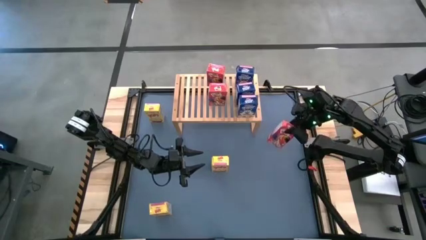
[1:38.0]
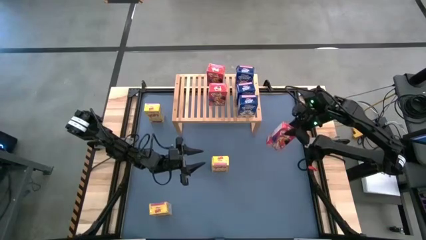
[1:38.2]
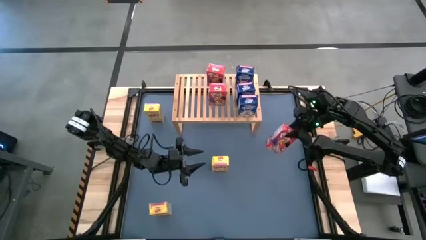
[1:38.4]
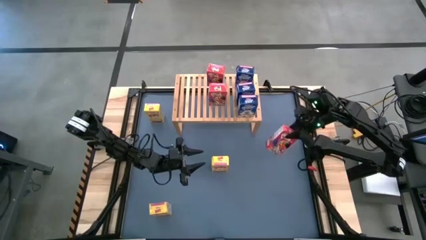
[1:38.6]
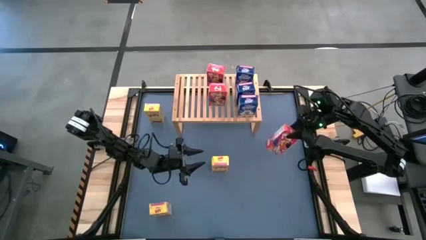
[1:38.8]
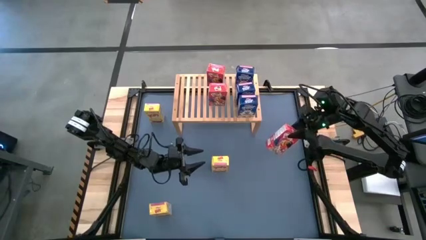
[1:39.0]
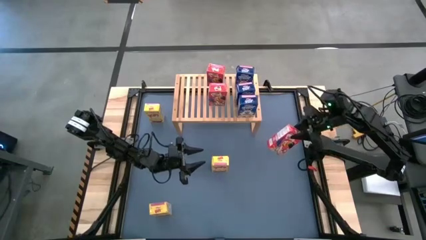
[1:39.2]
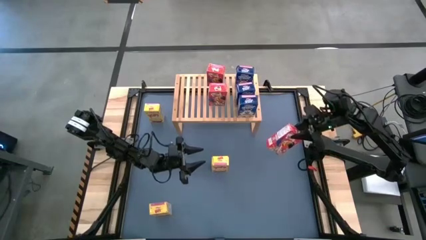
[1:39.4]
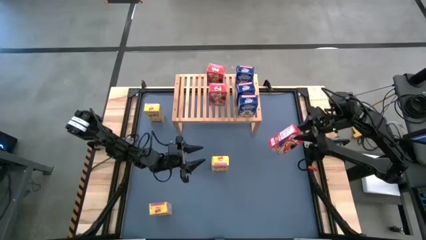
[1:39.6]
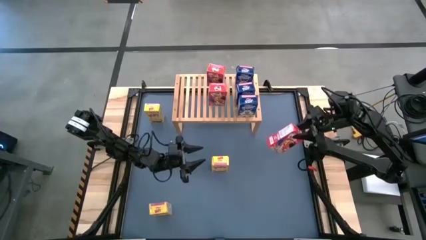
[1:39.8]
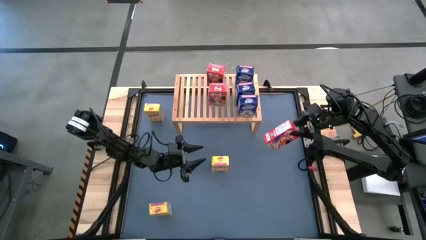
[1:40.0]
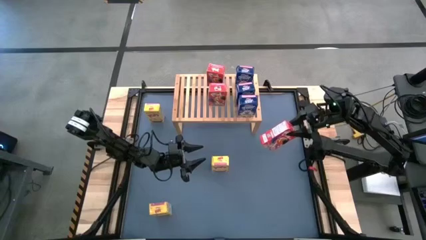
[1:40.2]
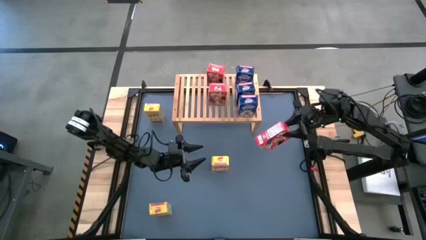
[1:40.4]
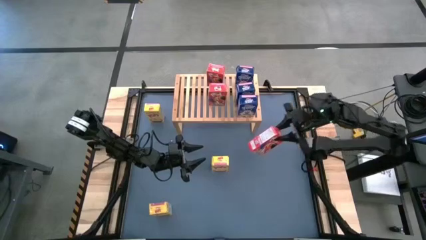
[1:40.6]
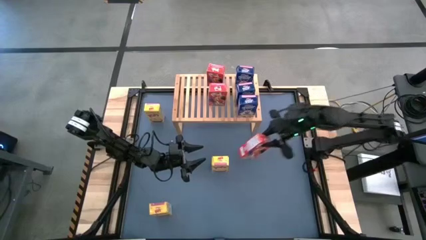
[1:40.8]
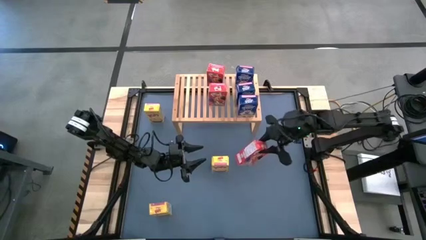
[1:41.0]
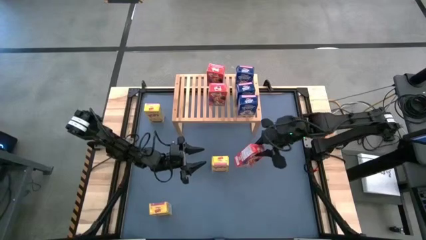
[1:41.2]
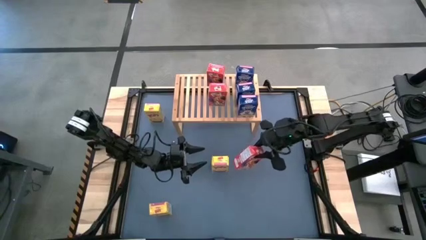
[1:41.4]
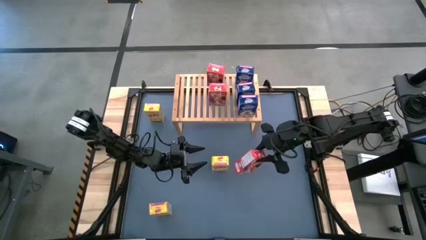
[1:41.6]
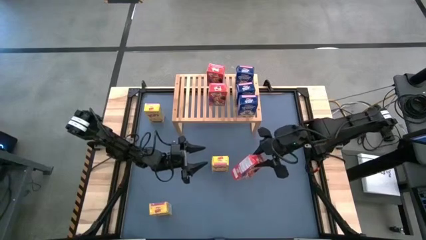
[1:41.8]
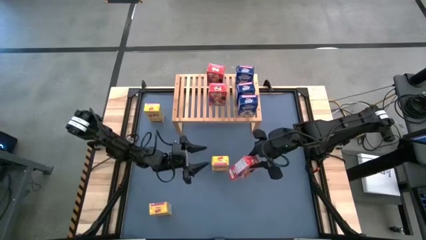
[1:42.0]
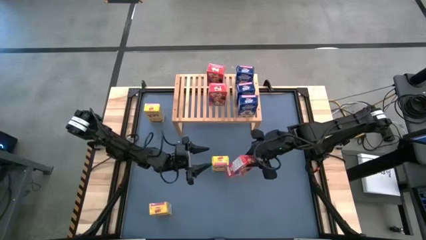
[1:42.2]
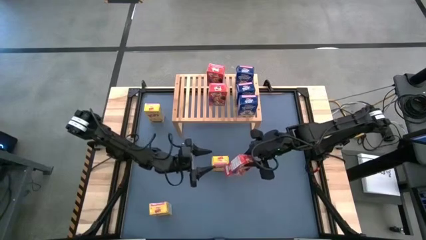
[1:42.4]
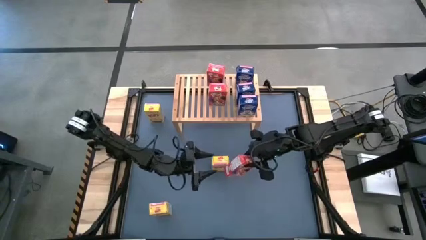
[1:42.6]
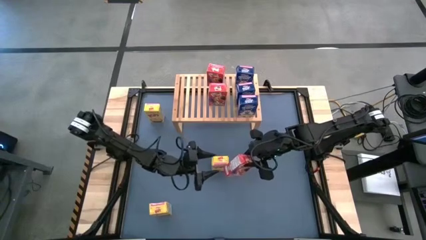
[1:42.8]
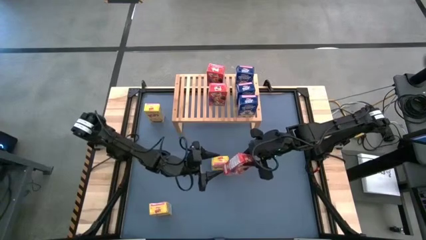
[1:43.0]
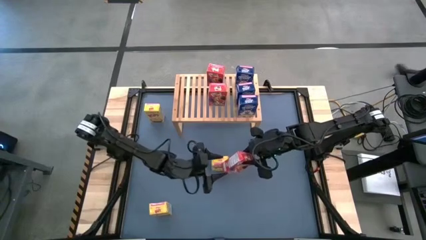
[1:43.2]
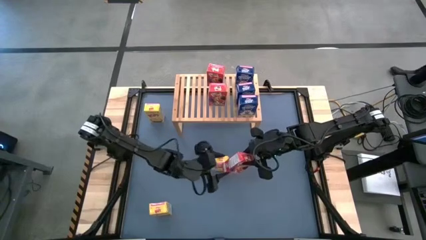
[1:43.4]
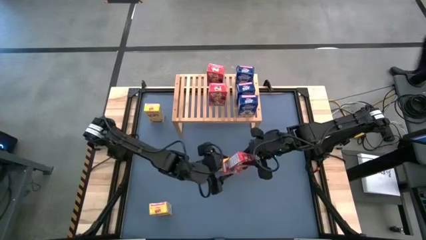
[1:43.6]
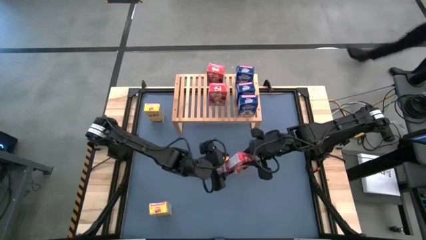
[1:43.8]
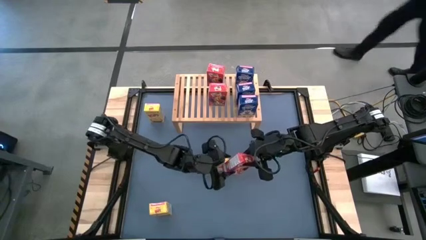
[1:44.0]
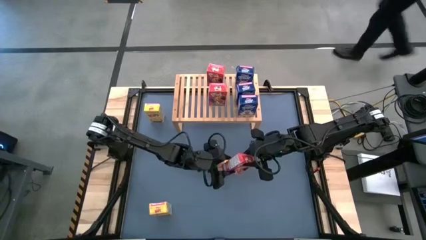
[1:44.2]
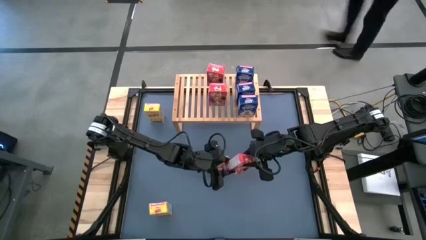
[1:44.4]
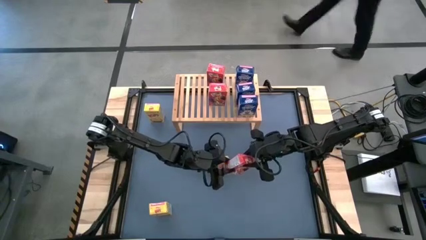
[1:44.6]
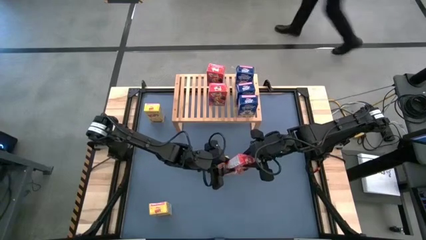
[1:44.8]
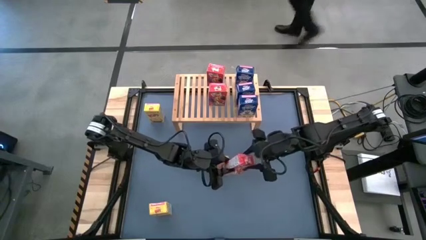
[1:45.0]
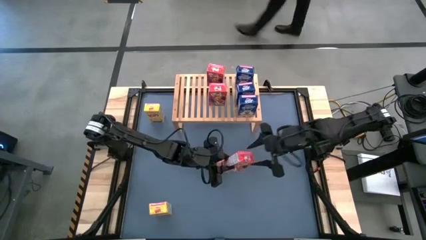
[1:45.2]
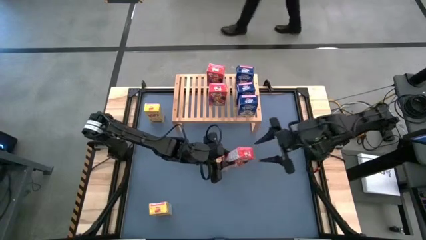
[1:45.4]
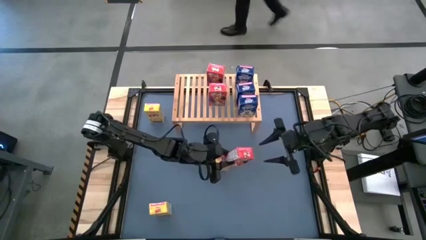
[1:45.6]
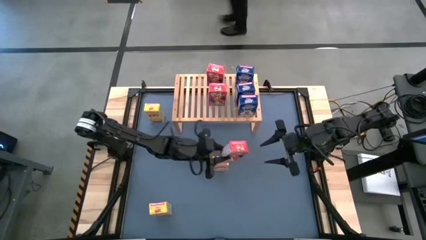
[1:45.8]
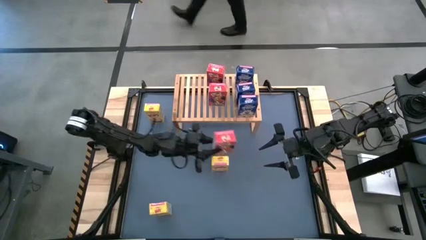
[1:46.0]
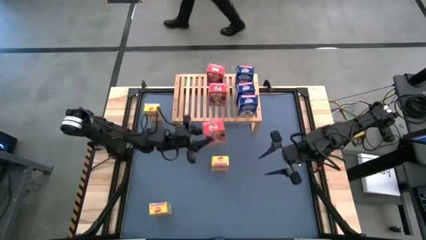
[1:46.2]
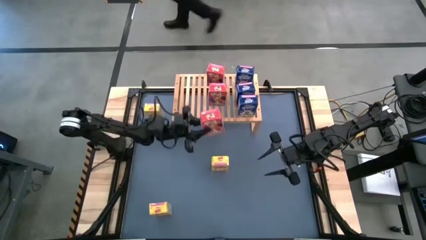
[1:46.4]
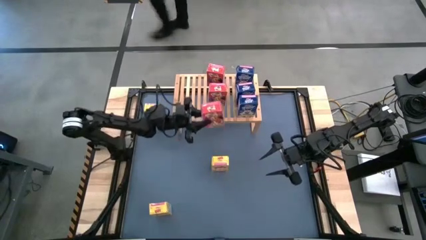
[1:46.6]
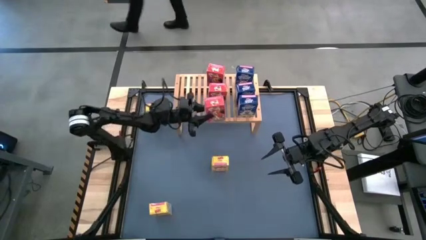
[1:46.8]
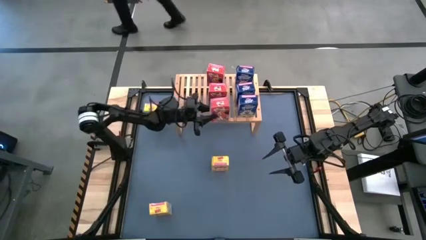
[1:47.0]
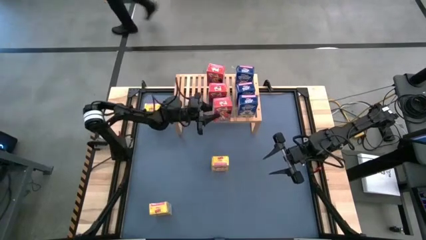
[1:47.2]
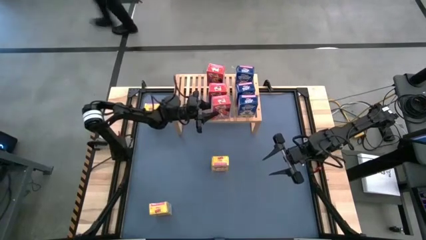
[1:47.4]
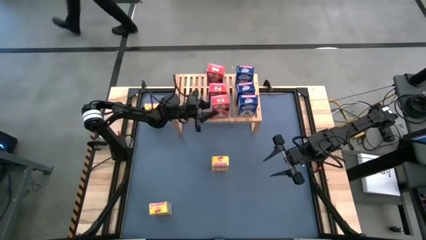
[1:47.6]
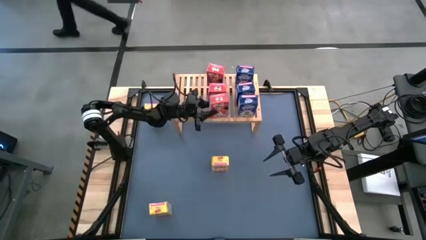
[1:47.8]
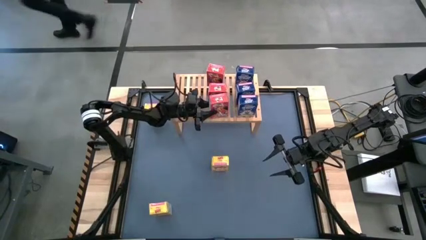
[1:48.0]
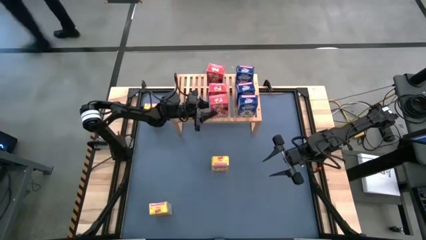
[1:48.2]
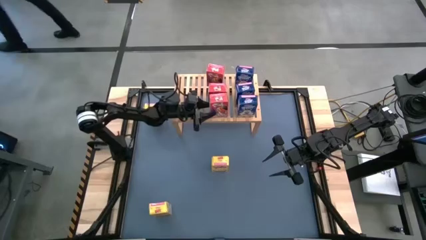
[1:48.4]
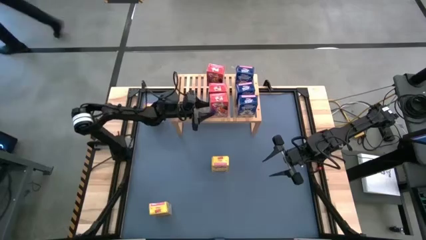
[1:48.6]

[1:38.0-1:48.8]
Task: Stack cereal on shelf
Put the red cereal box on the shelf aligned with the other red cereal box
